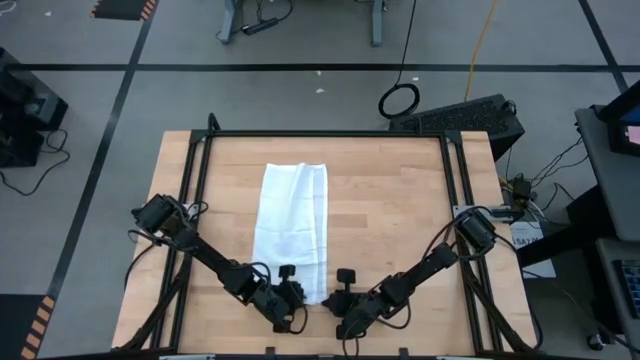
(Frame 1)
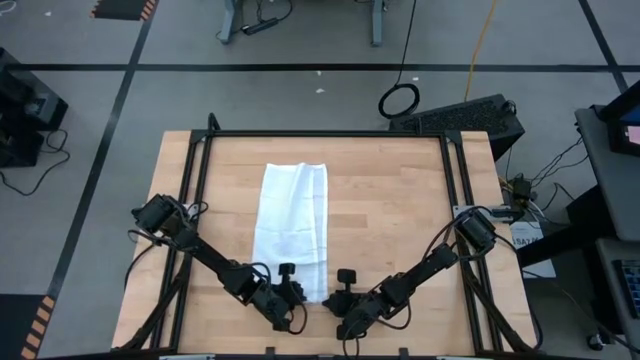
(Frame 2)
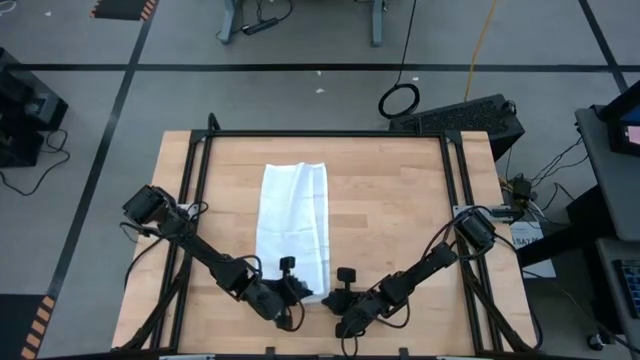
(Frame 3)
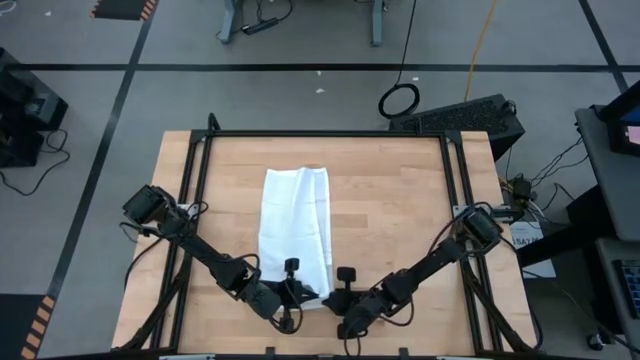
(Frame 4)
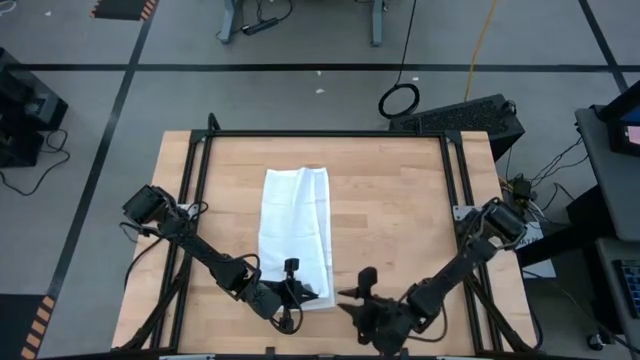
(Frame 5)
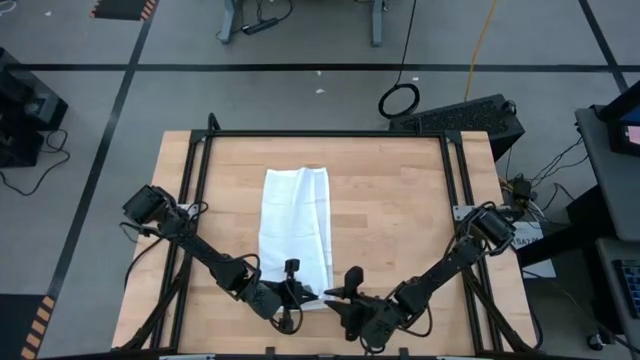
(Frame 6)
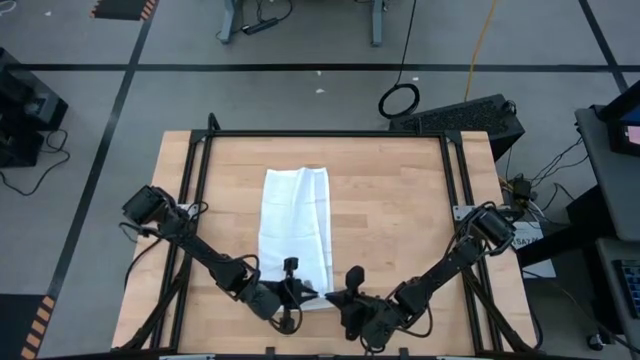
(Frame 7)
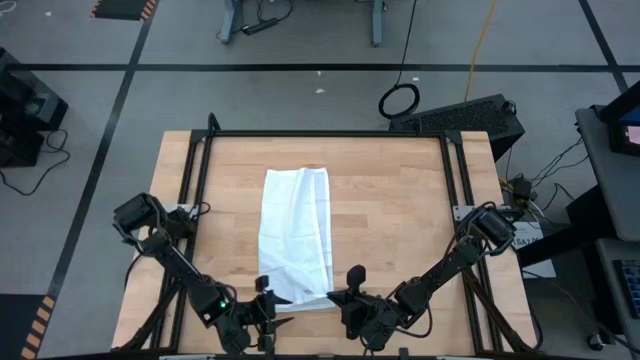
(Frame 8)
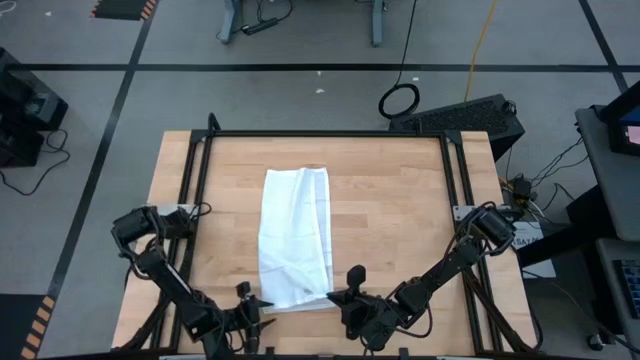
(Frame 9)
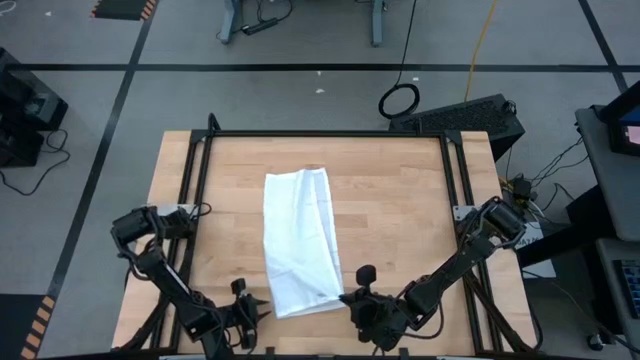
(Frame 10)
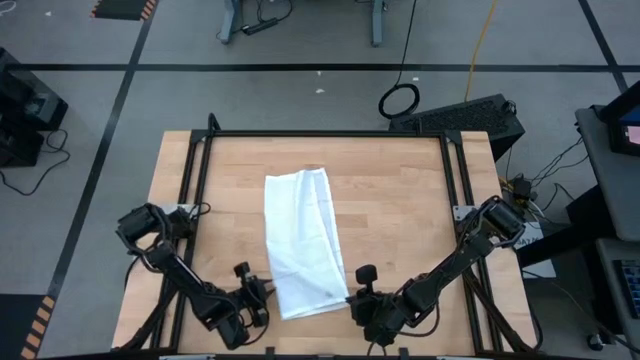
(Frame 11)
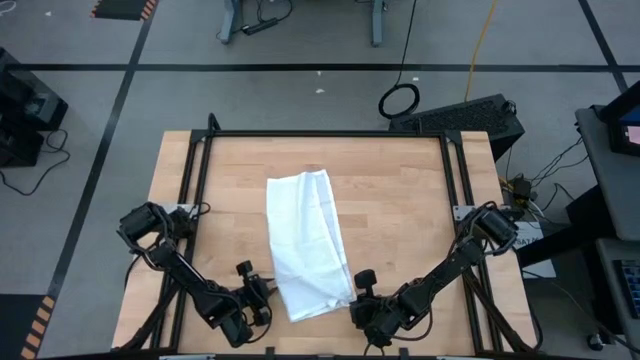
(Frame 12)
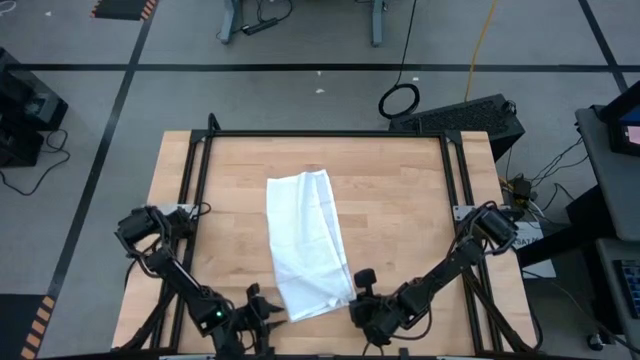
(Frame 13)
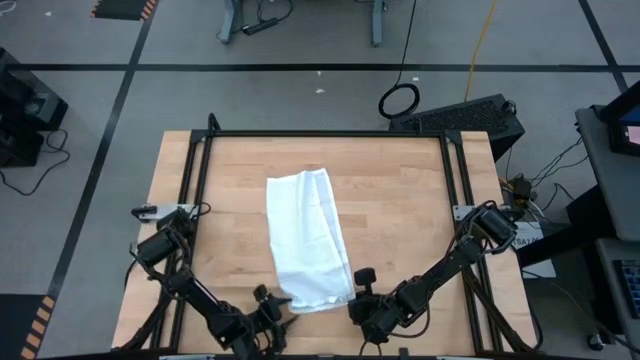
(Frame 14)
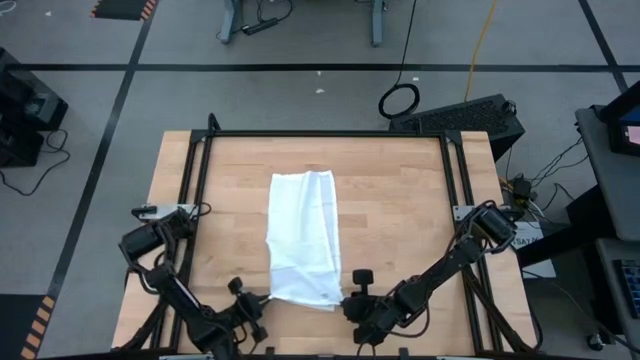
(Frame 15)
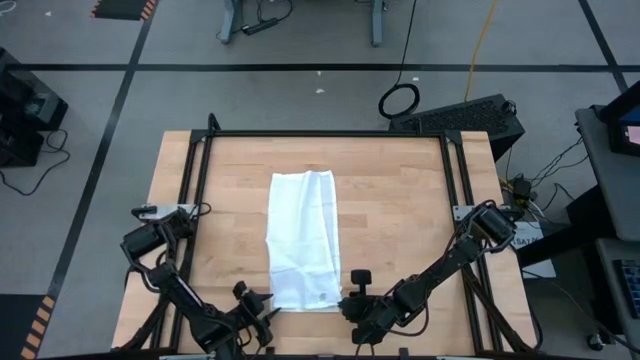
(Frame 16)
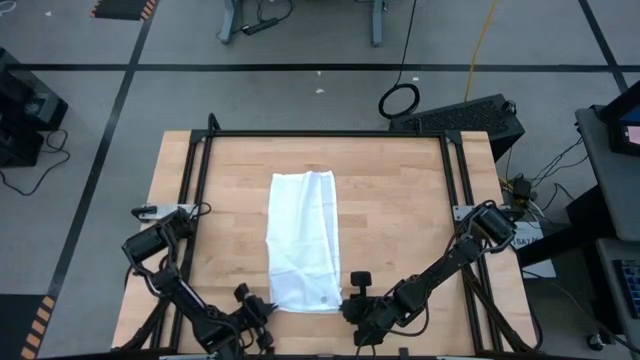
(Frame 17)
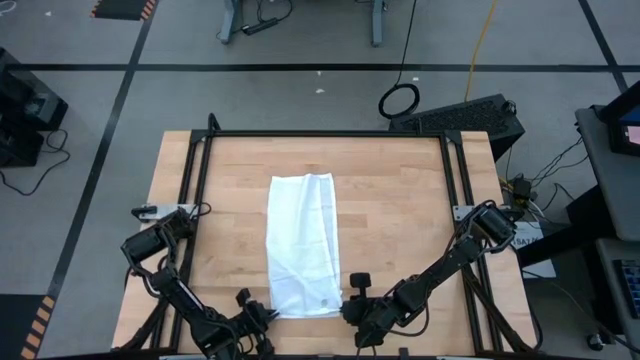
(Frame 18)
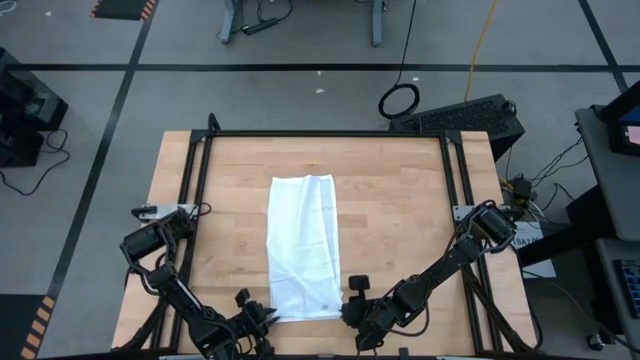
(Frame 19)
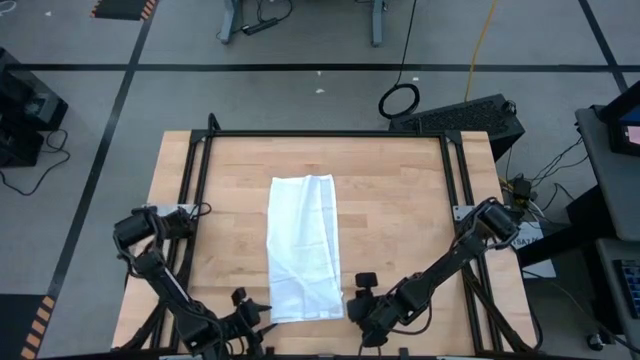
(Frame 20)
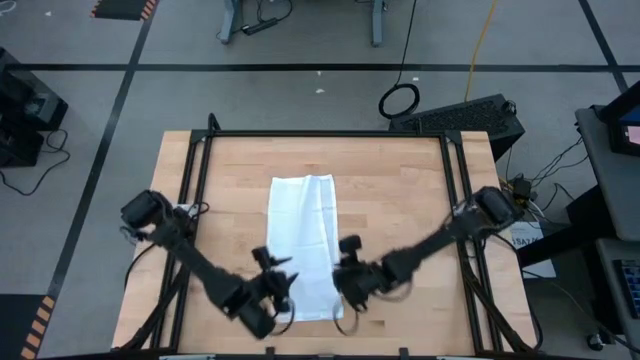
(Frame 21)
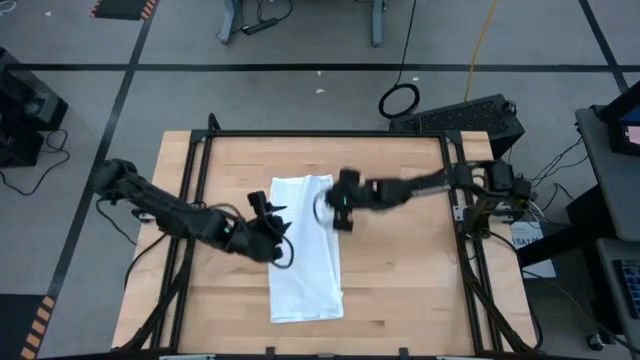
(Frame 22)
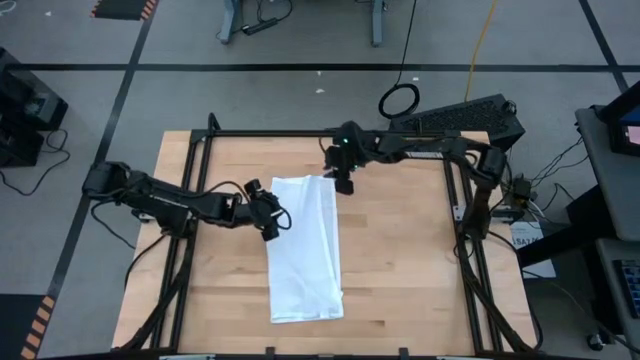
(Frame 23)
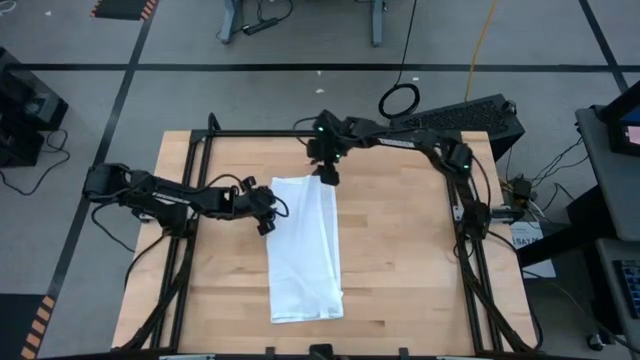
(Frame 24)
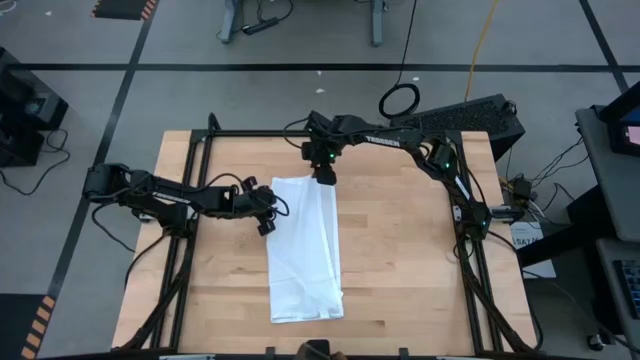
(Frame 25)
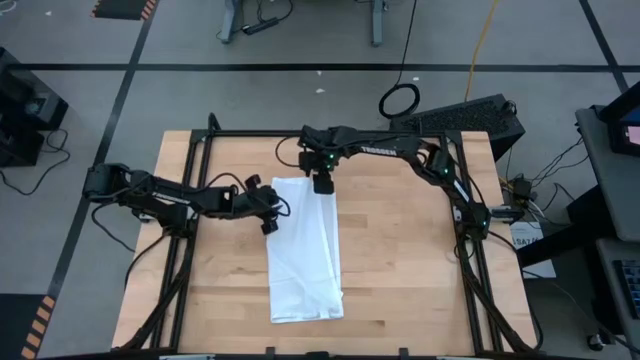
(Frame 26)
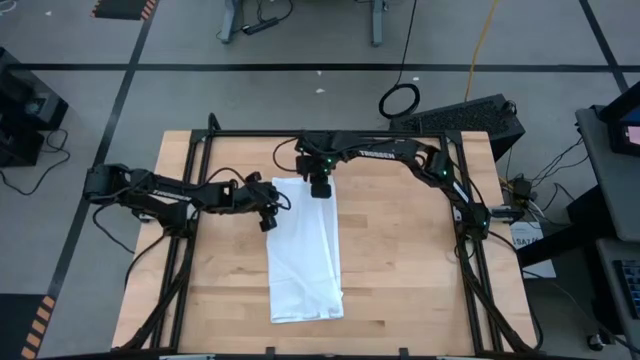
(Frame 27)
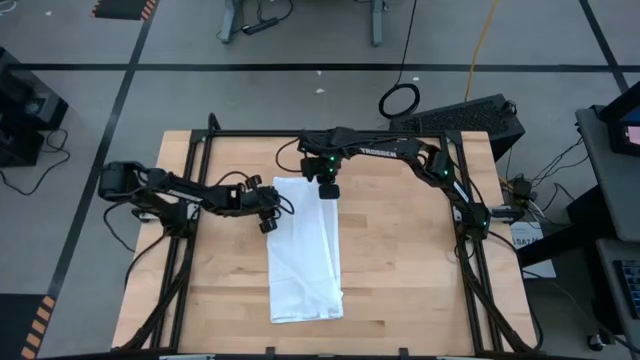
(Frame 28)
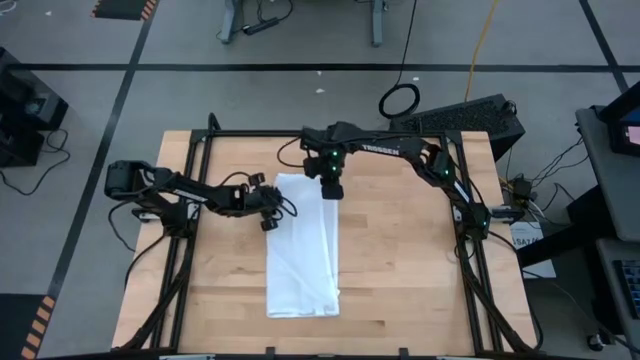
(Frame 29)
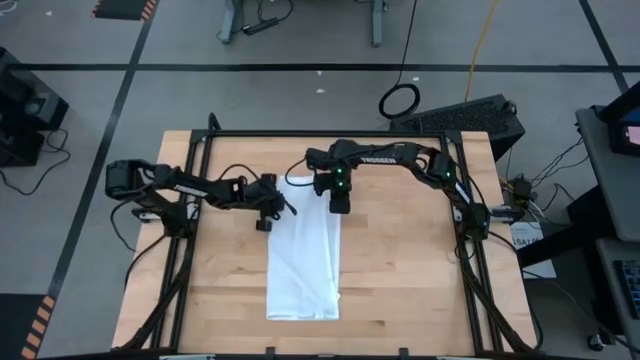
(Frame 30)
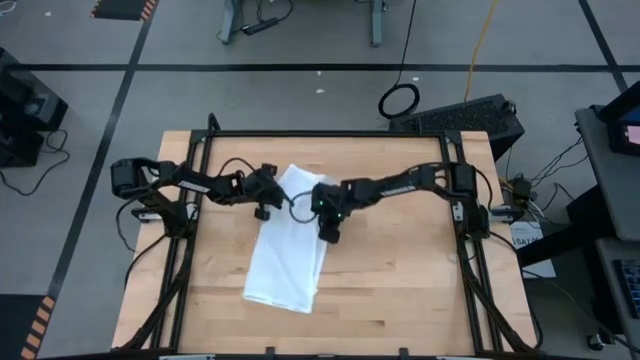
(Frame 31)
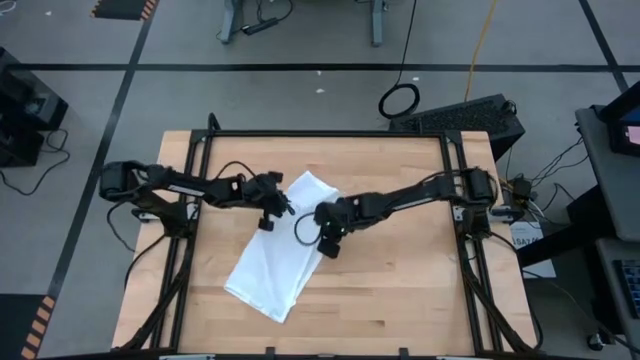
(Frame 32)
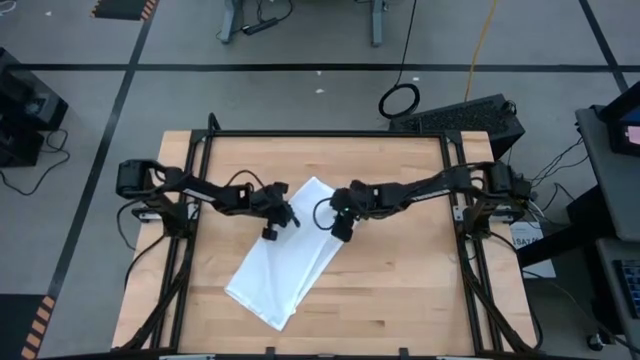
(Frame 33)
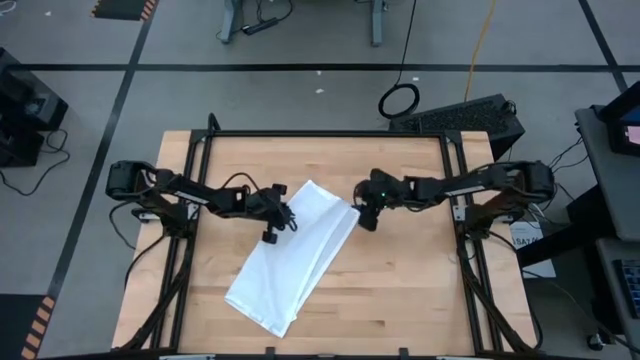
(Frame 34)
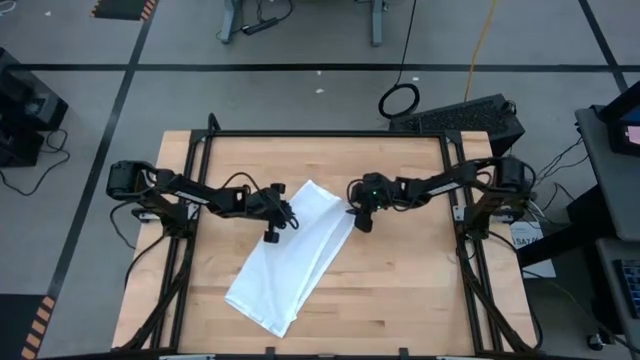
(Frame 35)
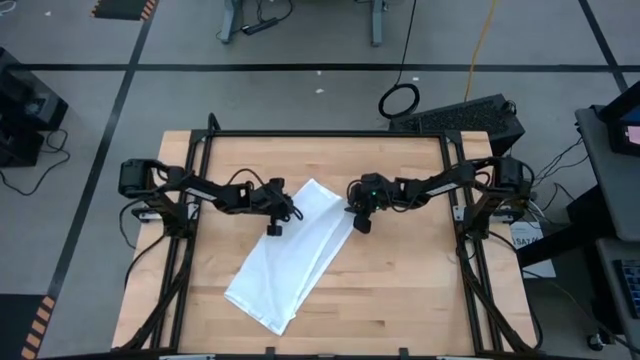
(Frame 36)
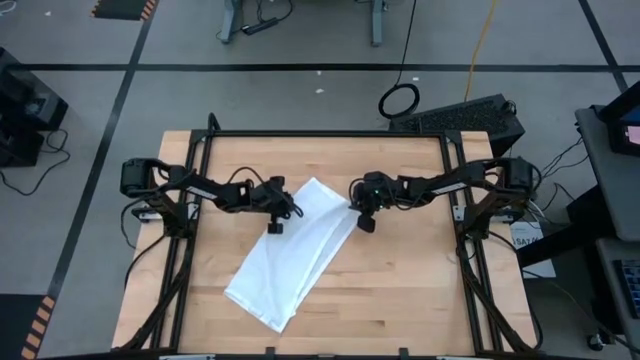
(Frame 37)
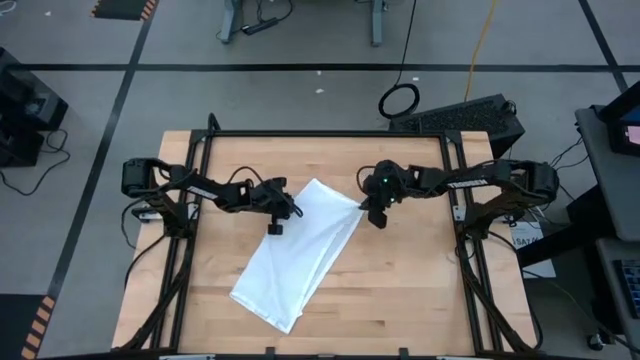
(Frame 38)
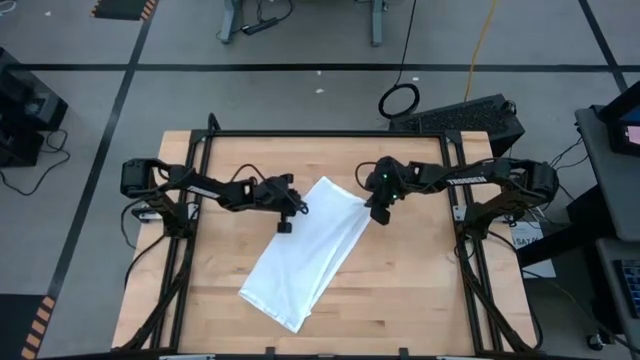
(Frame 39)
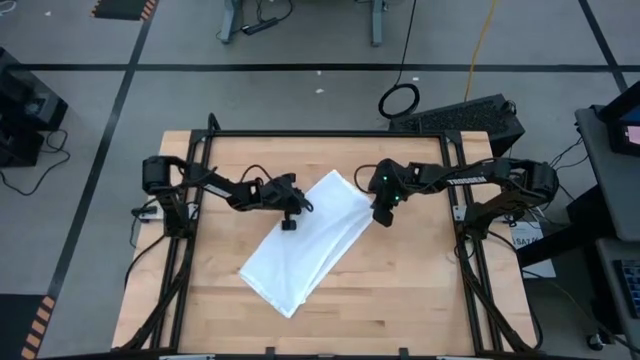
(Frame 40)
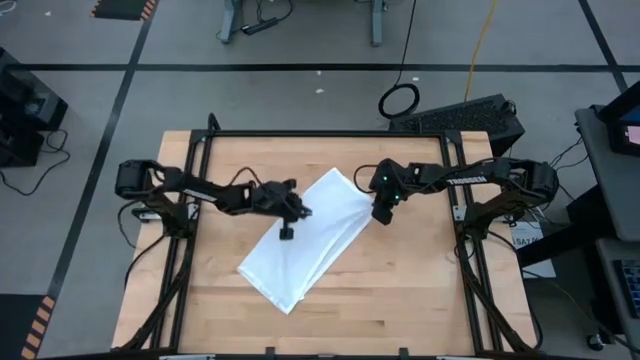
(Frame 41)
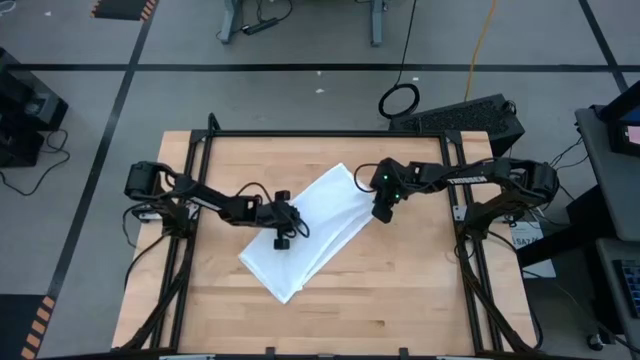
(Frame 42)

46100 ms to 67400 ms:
Task: Roll napkin
Fold the white table napkin

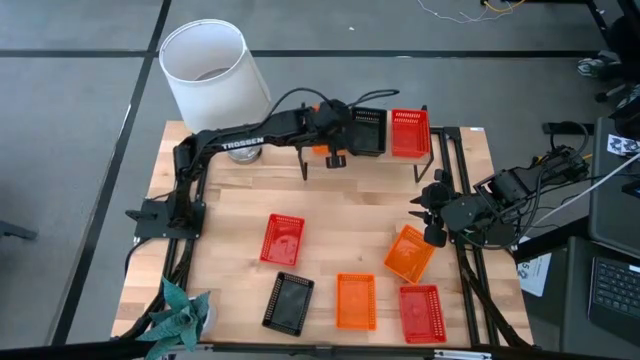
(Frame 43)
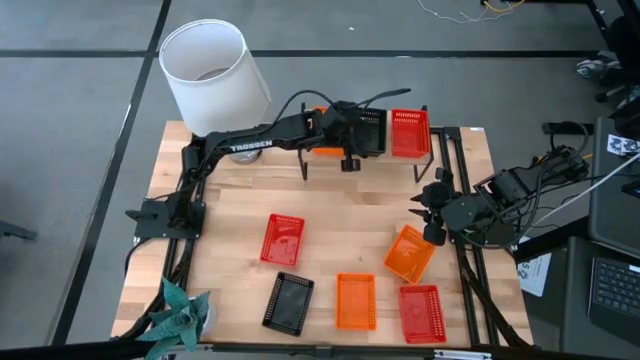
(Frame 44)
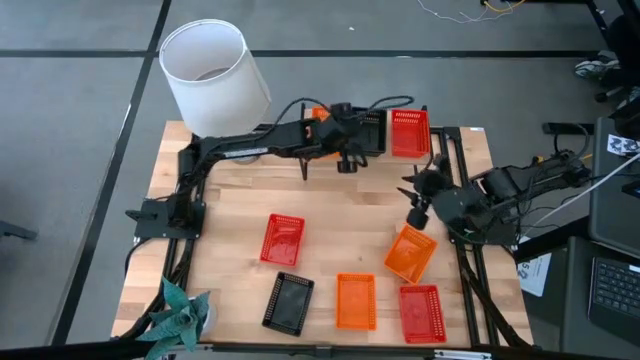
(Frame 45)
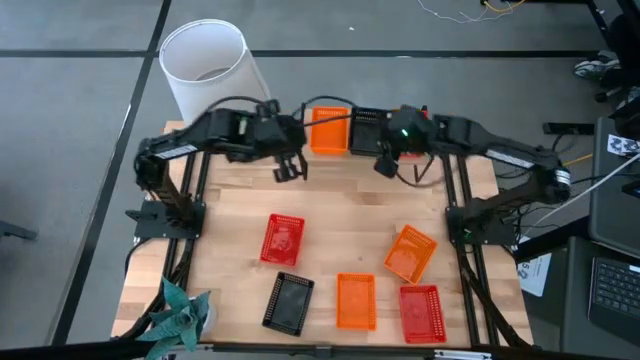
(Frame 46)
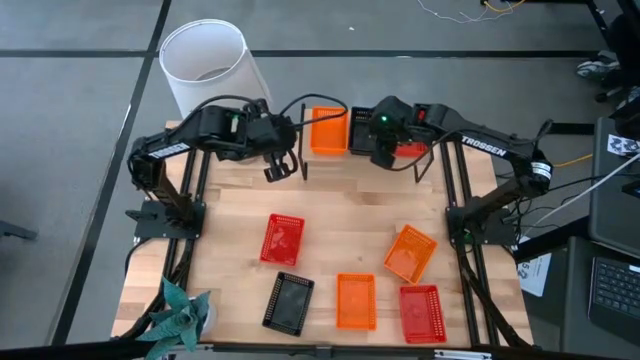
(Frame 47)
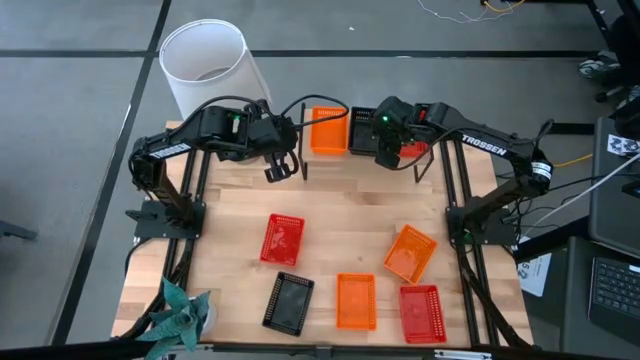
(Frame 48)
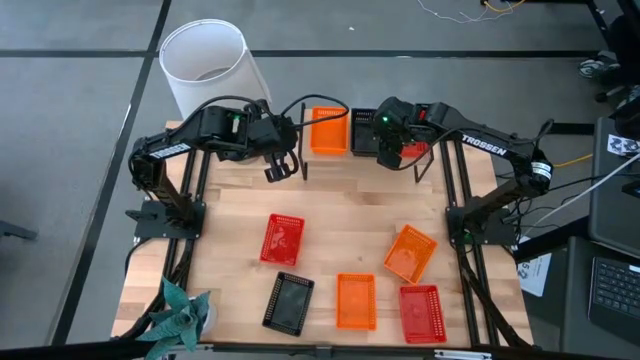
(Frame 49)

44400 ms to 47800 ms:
Task: Stack baskets on shelf by color
Adjust the stacked black bins on the shelf
